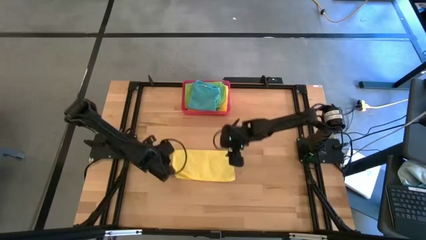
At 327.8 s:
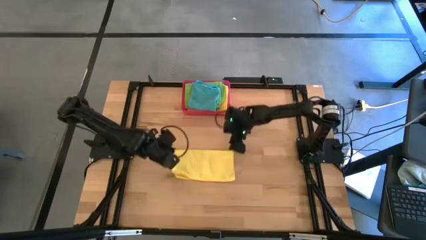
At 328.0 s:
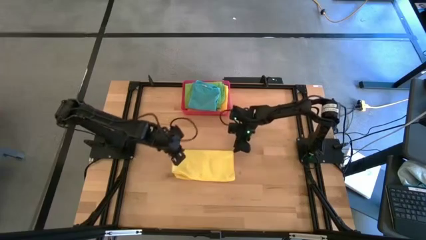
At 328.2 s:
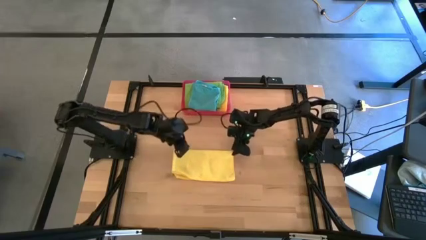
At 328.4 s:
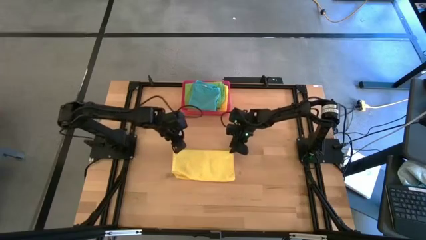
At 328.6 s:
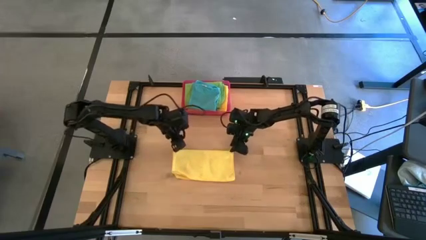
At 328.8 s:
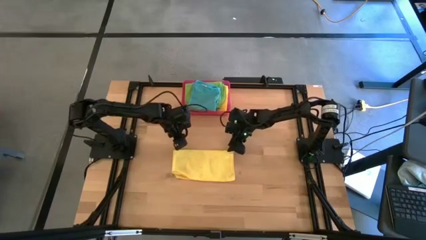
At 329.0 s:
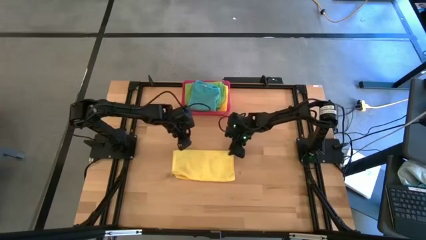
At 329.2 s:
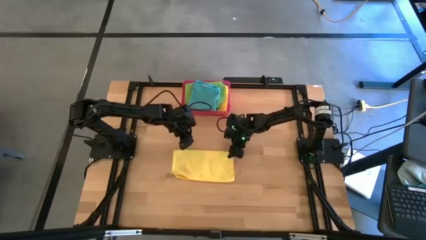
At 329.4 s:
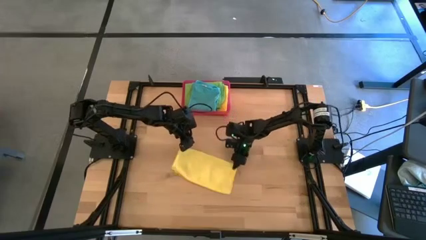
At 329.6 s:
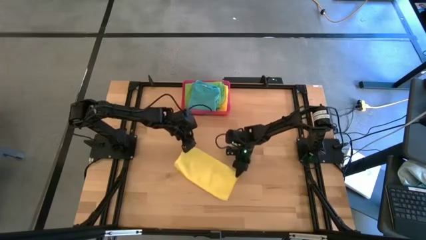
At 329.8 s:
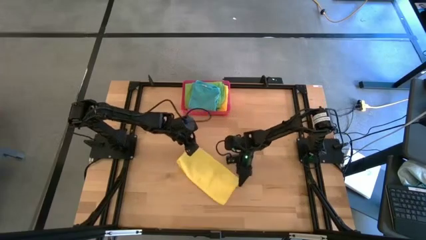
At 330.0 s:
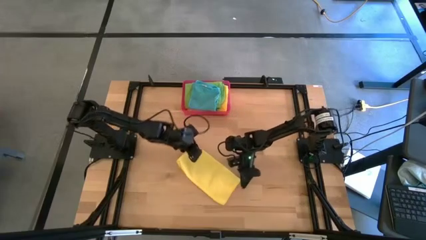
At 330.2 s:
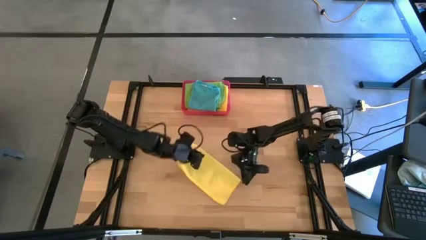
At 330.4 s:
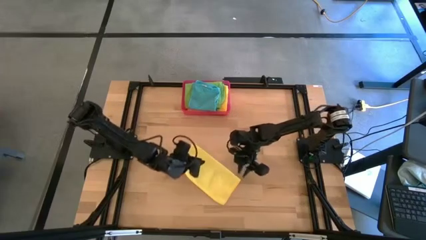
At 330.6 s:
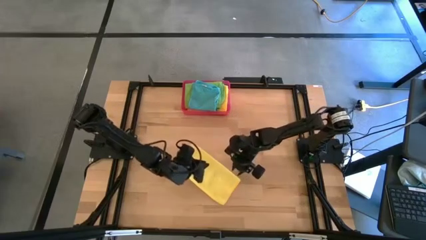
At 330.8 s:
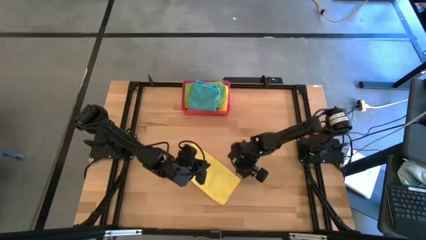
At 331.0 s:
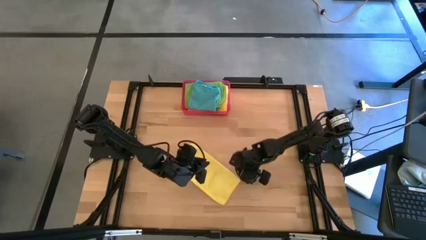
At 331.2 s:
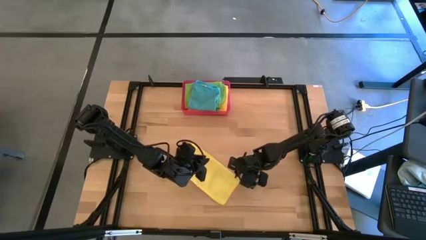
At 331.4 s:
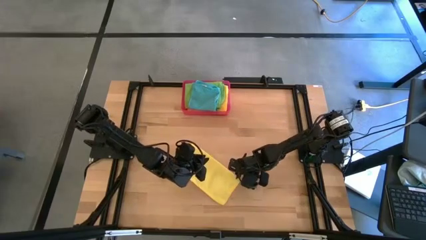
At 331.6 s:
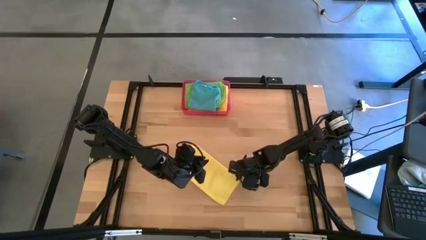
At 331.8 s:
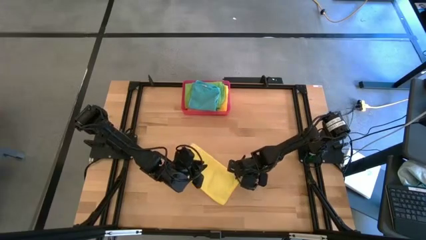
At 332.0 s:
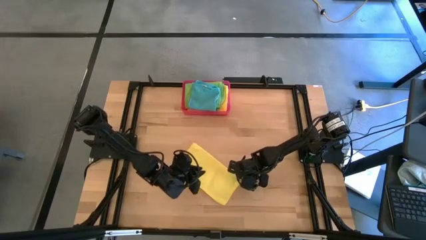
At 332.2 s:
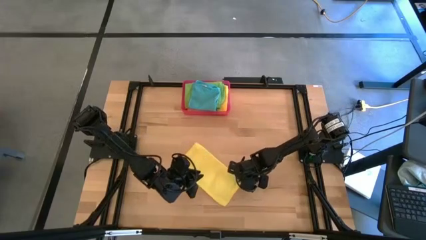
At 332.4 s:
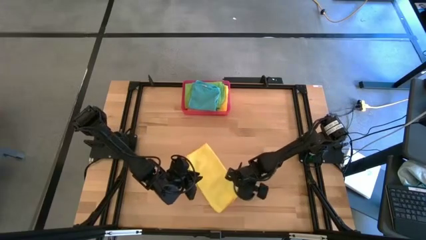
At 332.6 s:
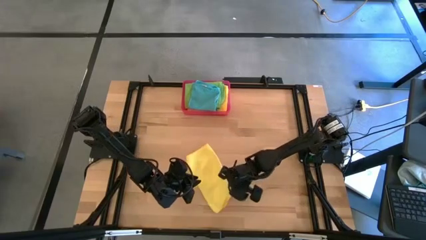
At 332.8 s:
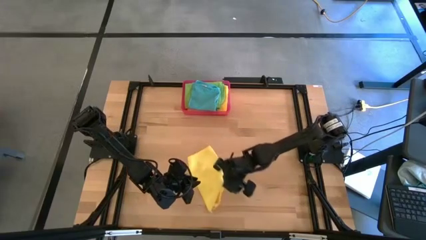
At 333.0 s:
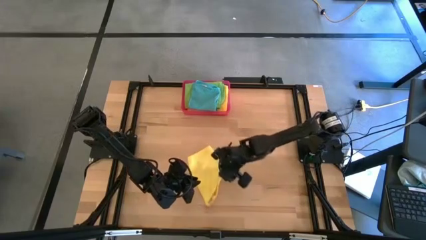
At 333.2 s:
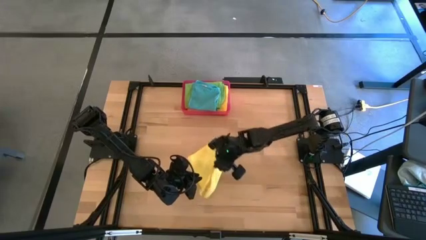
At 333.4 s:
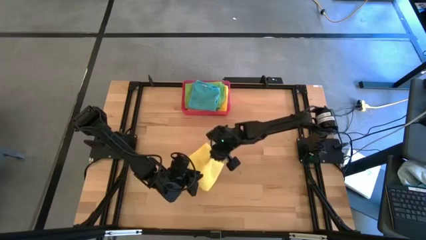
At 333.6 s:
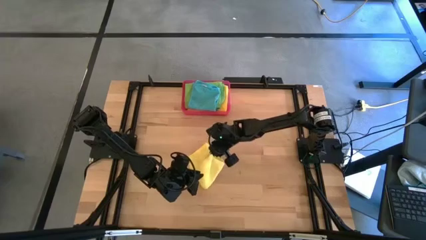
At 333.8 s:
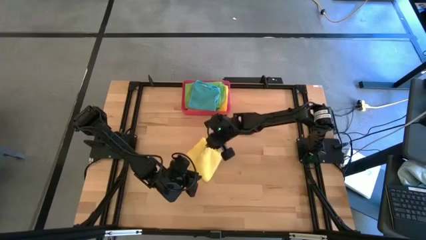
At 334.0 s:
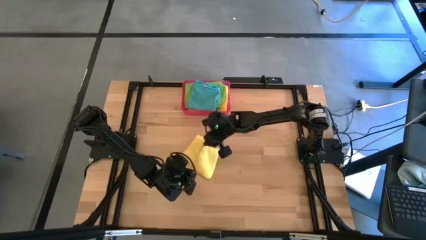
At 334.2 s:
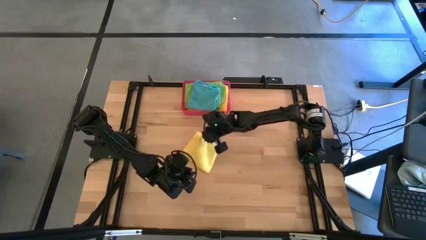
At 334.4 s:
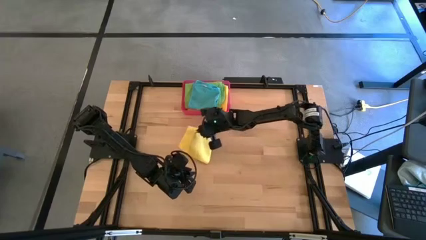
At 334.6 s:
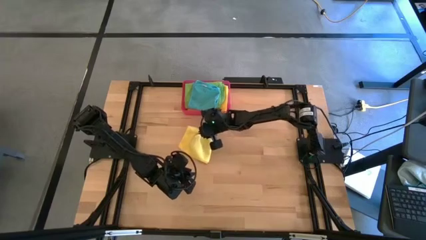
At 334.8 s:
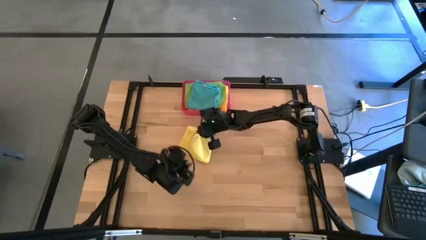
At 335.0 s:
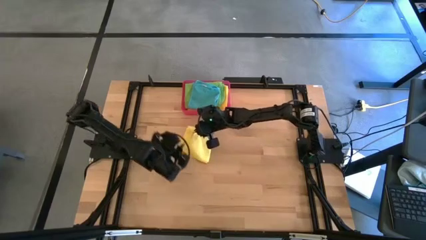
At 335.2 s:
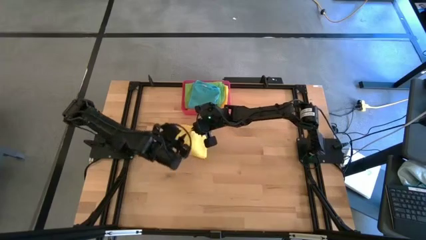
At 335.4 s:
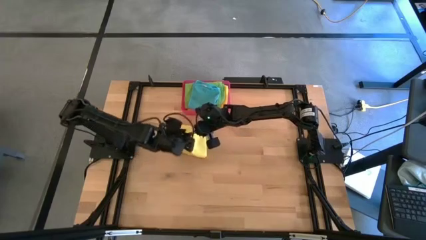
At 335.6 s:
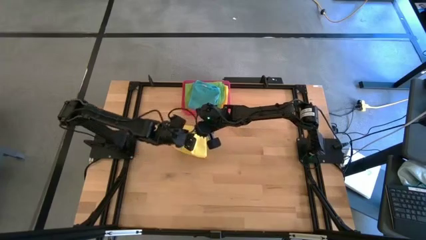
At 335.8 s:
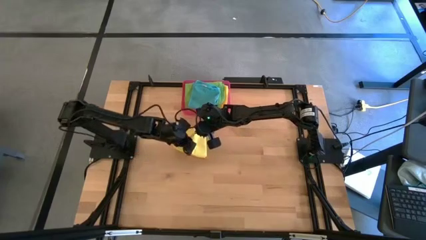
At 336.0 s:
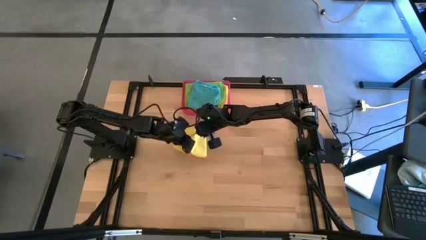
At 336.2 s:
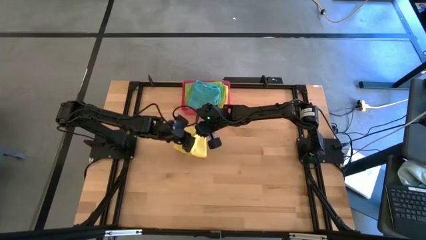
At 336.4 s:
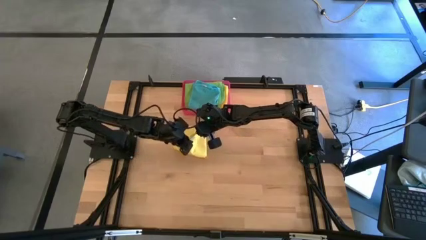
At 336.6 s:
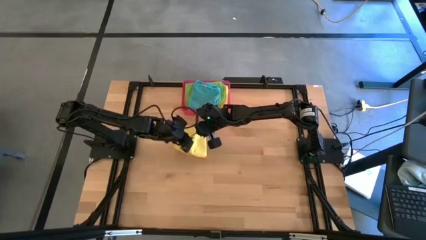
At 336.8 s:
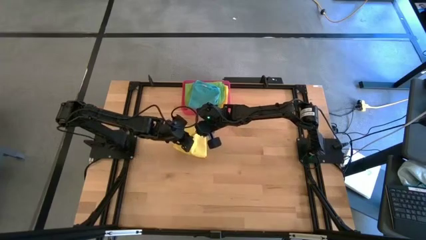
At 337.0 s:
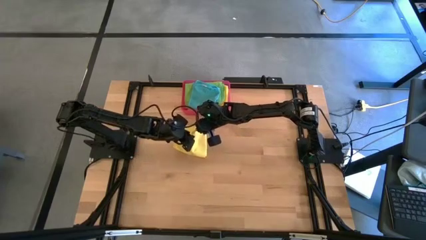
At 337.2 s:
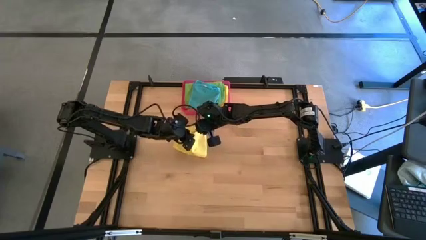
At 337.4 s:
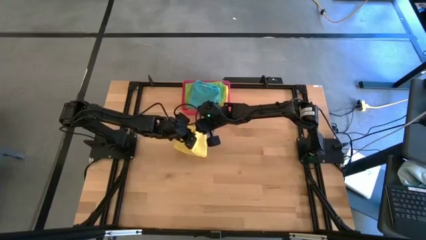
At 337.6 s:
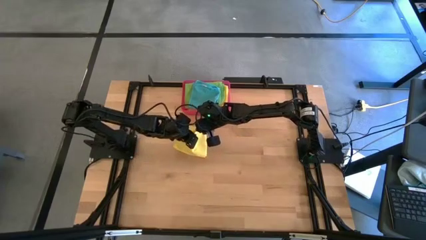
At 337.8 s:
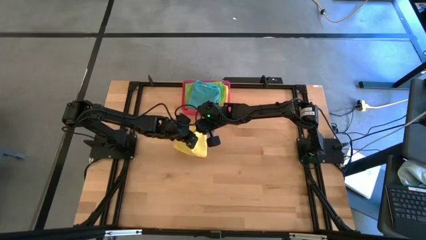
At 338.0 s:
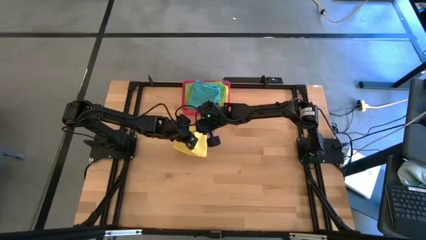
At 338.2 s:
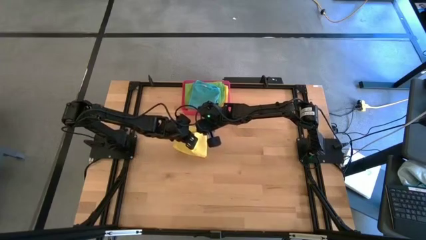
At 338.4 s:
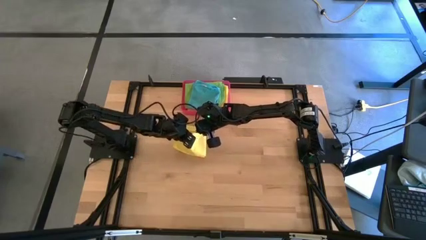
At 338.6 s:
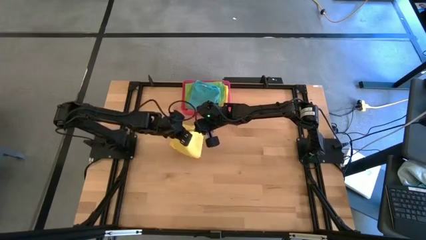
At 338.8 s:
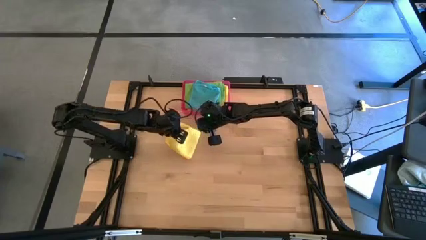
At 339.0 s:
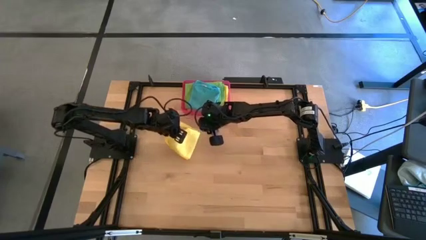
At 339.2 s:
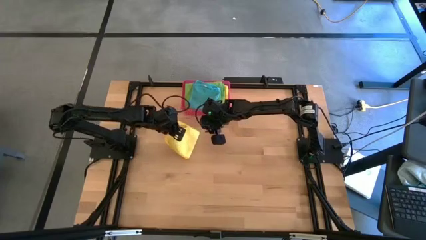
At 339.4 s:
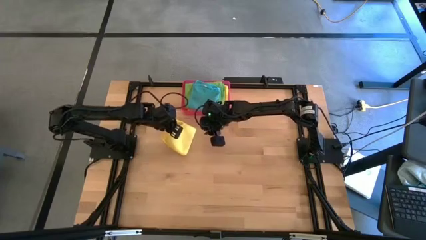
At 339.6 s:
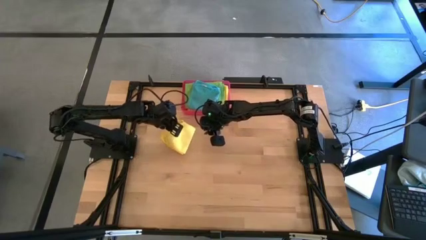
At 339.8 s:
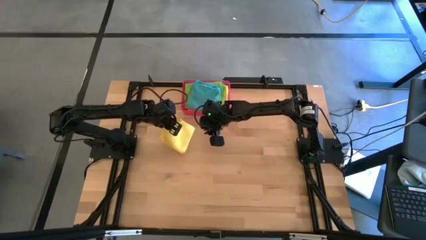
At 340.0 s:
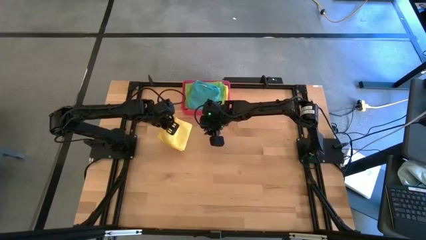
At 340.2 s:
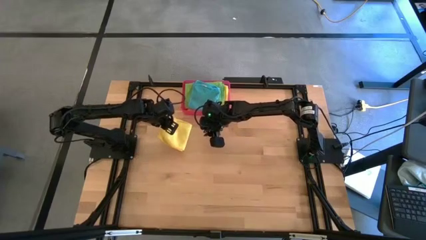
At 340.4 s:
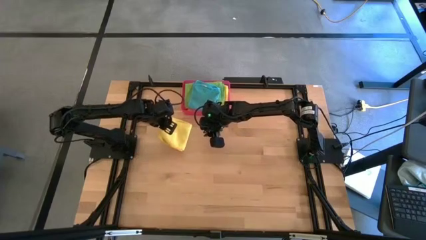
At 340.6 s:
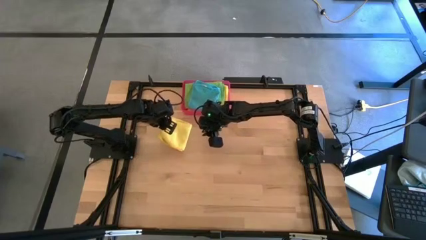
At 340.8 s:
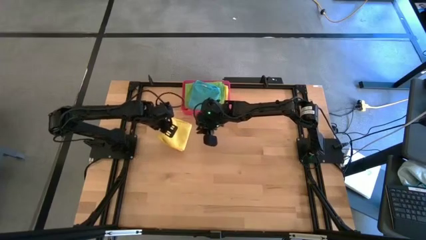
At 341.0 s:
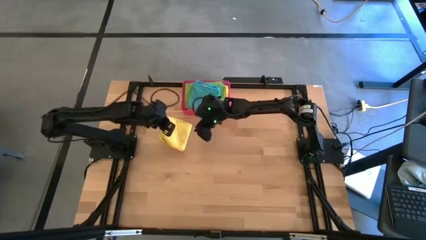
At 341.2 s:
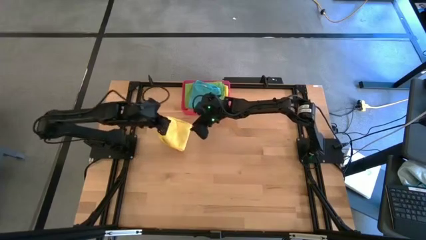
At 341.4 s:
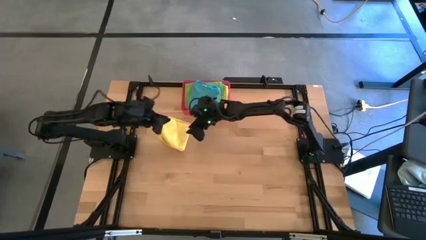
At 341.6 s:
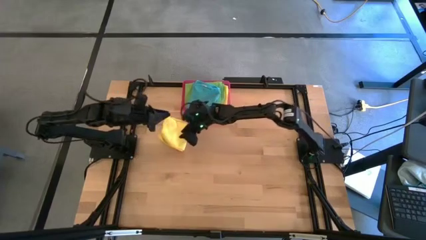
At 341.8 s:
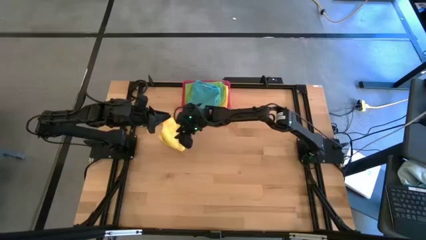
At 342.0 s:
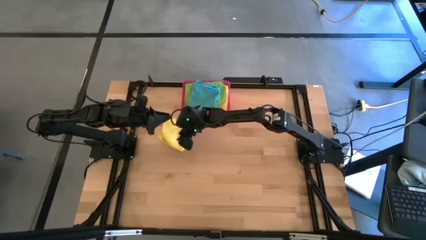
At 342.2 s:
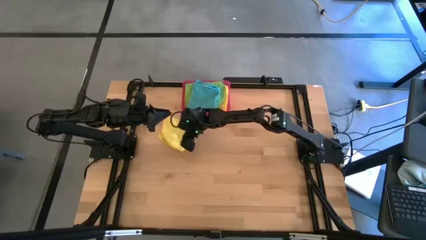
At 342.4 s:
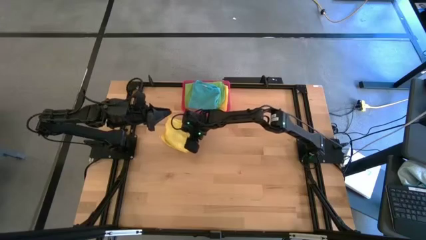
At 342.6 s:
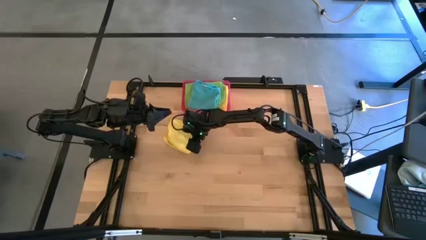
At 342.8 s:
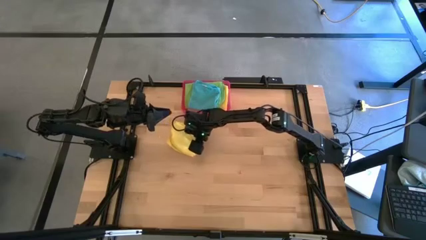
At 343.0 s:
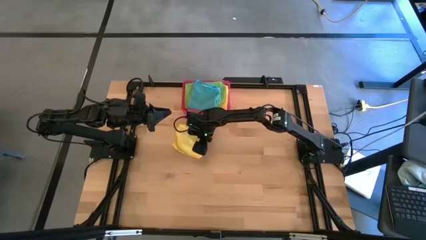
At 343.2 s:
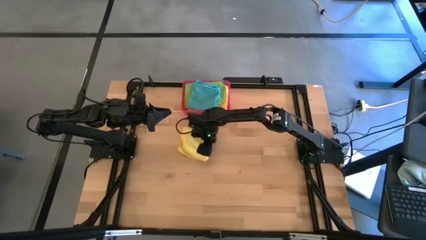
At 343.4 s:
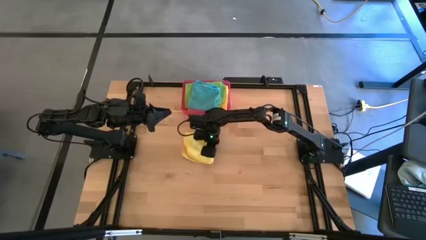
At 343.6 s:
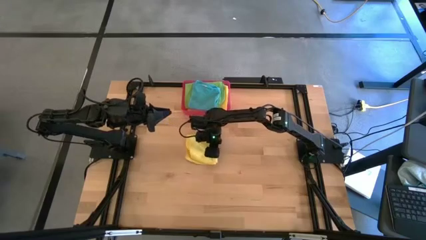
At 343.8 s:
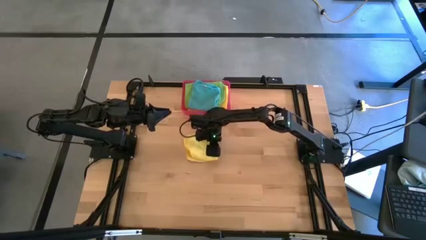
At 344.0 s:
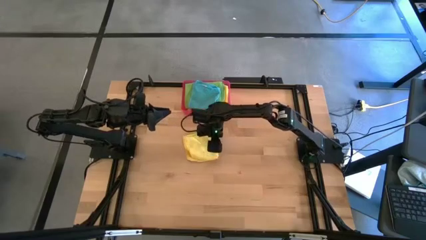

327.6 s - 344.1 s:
Task: Fold microfiber towels
Fold the yellow microfiber cloth
